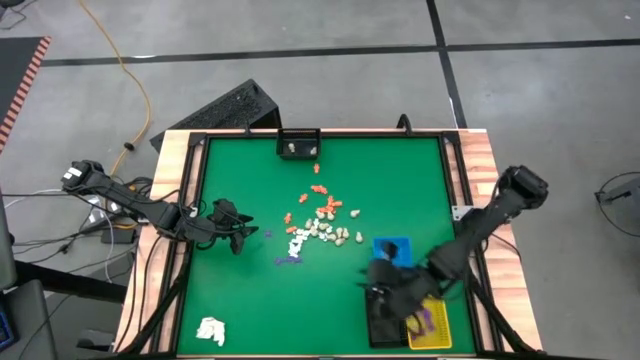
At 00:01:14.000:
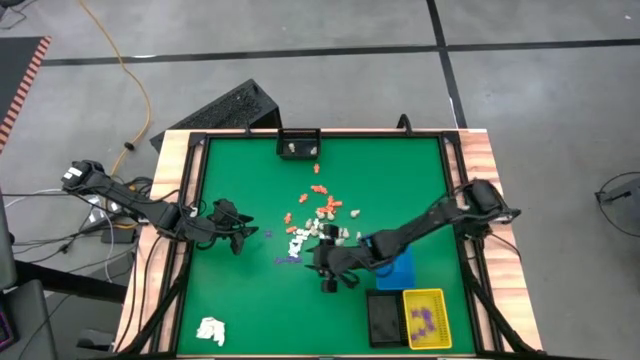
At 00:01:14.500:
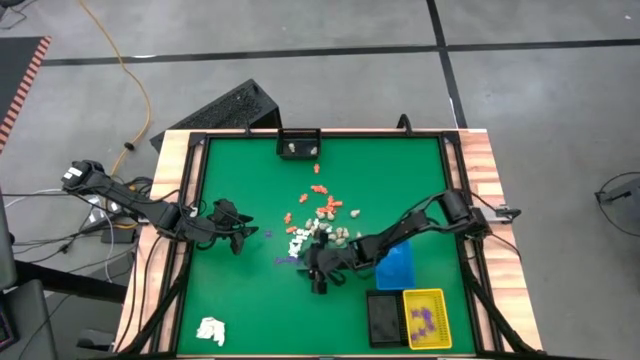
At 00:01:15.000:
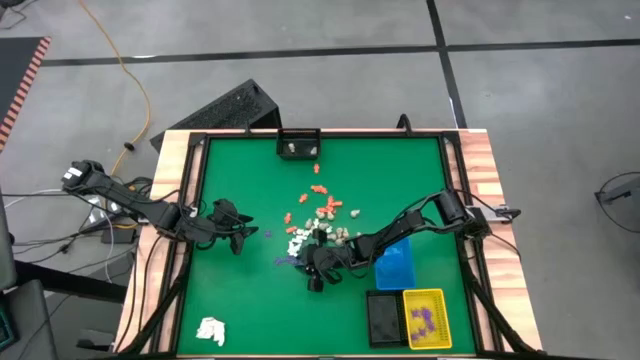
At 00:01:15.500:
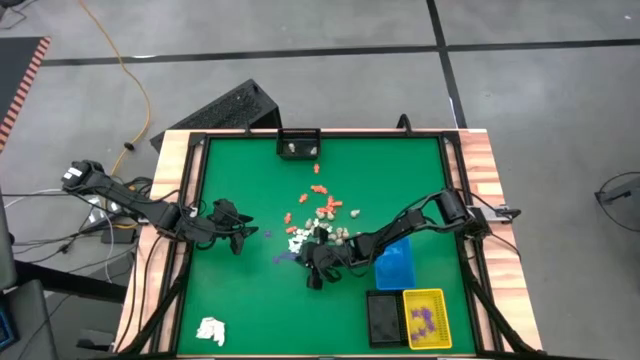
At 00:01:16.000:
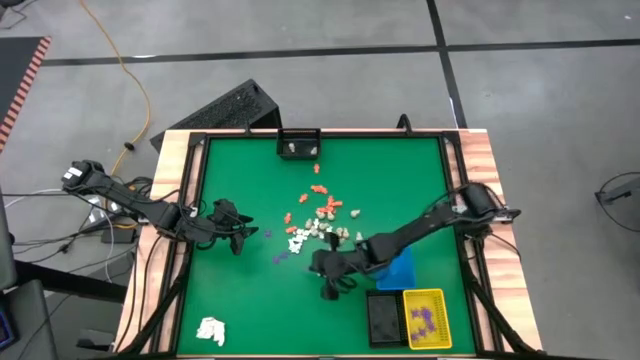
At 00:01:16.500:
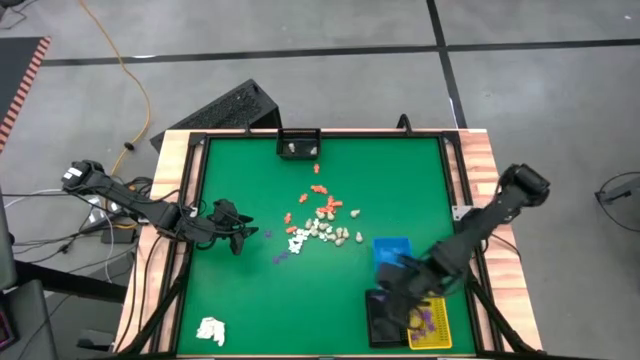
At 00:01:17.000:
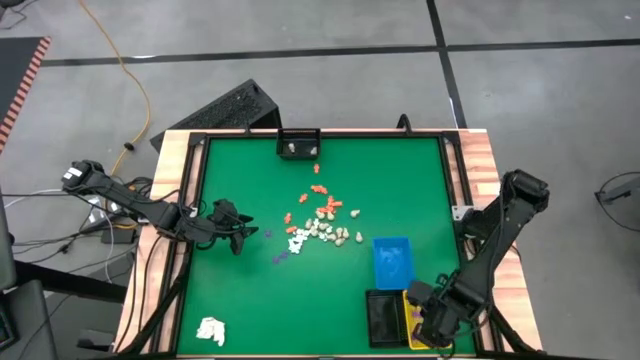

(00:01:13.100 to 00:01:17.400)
Task: Sort Halloween decoration
Put the purple spider toy into the yellow bin

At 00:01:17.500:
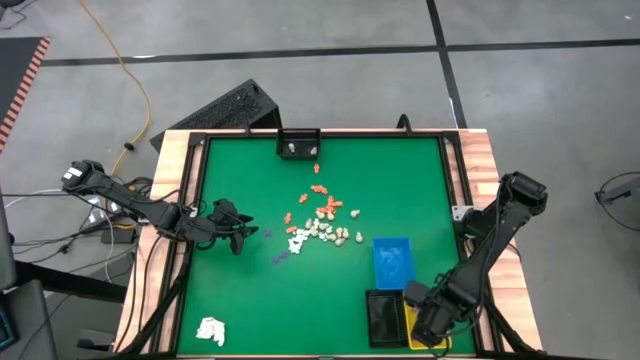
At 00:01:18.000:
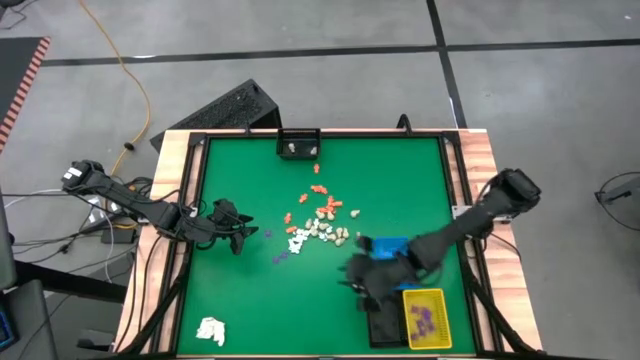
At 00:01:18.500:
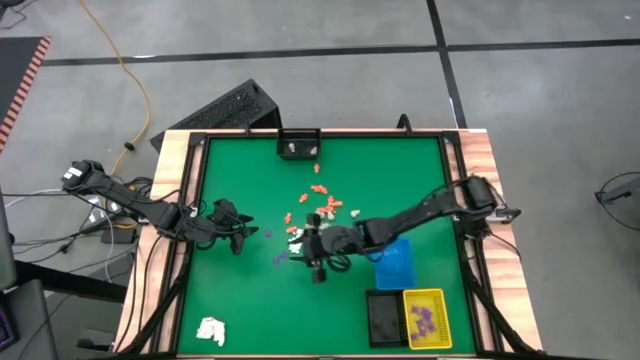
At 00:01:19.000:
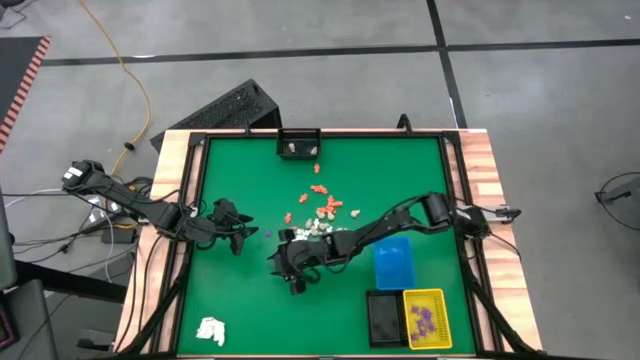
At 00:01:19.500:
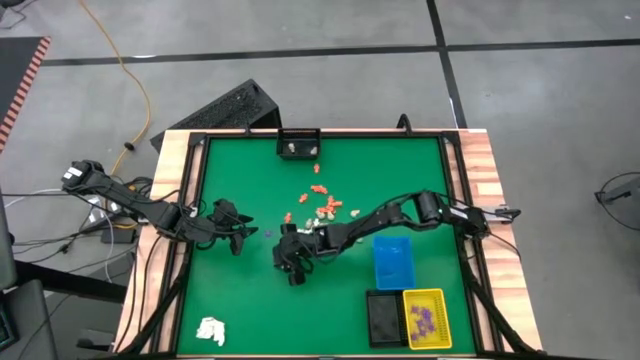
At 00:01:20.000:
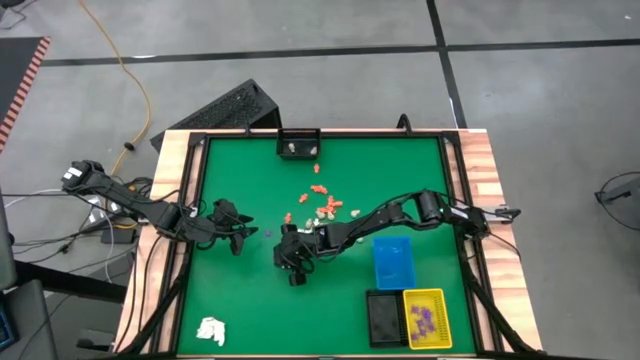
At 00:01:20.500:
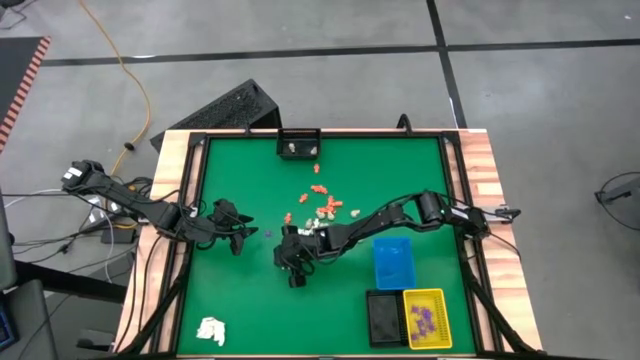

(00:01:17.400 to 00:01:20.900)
Put the purple spider toy into the yellow bin

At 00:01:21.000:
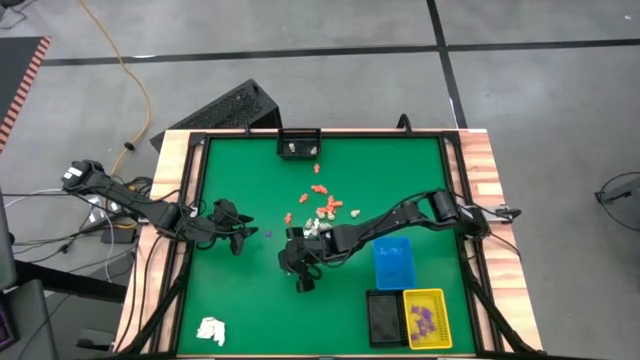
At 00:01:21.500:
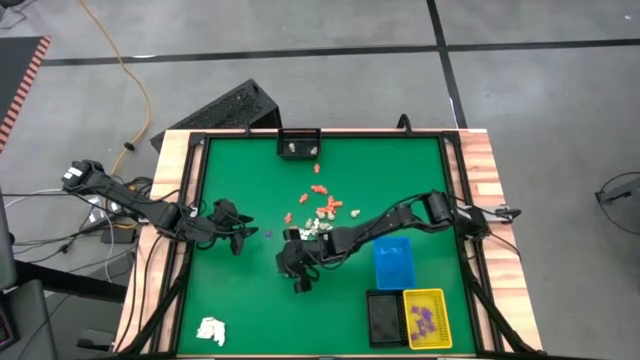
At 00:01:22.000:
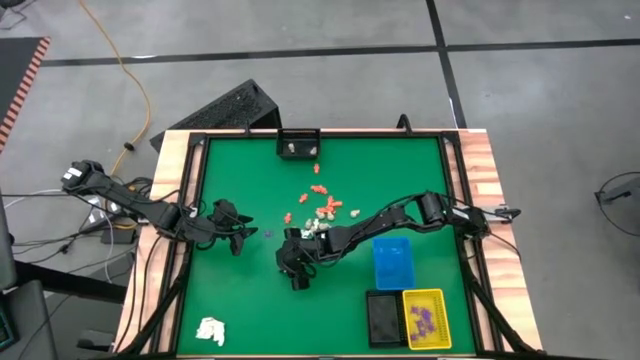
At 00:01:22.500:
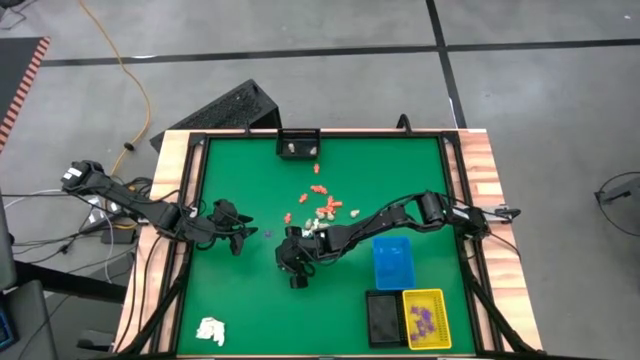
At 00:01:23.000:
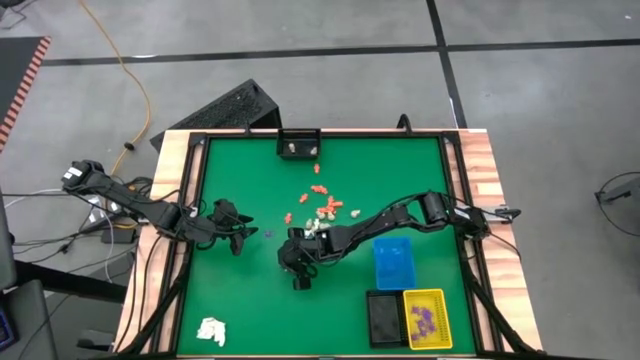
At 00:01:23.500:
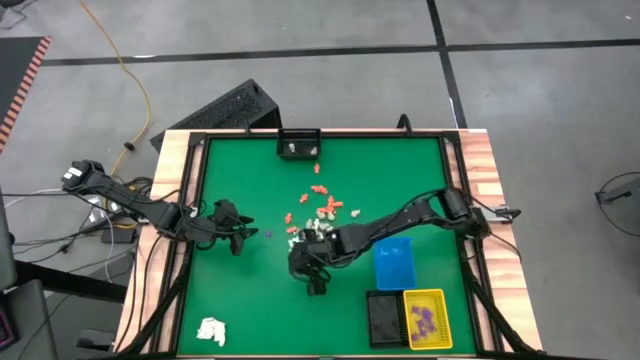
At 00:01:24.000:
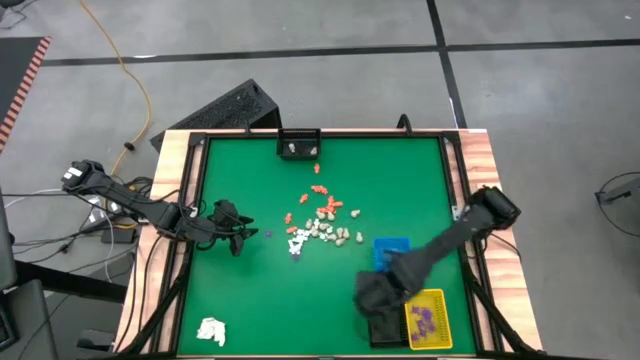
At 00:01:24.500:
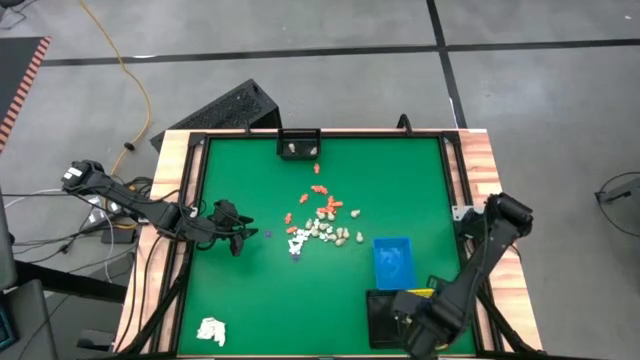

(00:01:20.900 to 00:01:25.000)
Put the purple spider toy into the yellow bin

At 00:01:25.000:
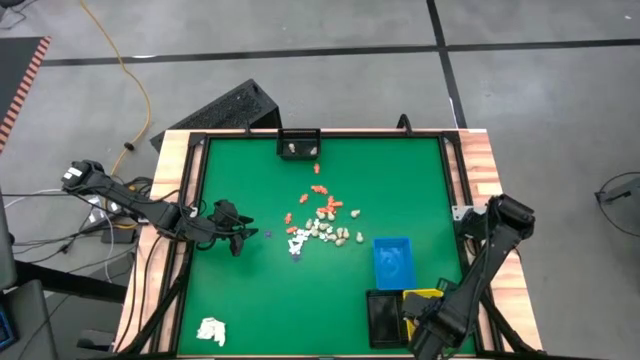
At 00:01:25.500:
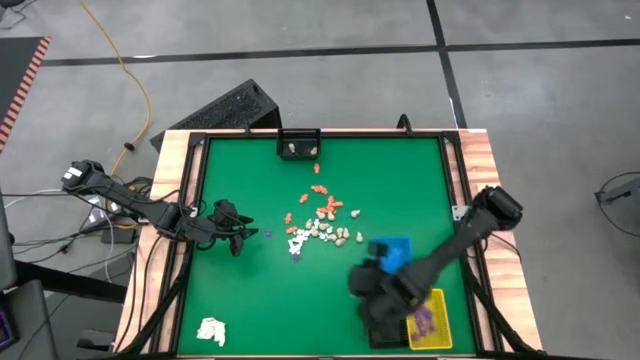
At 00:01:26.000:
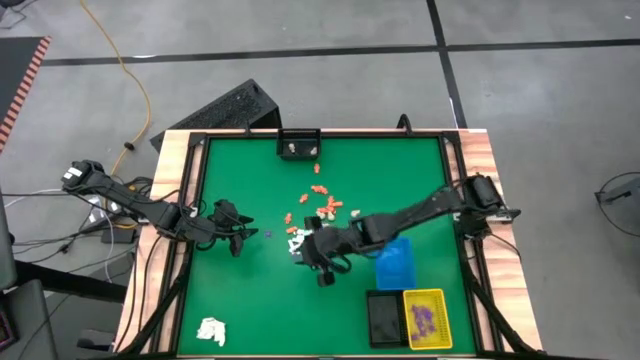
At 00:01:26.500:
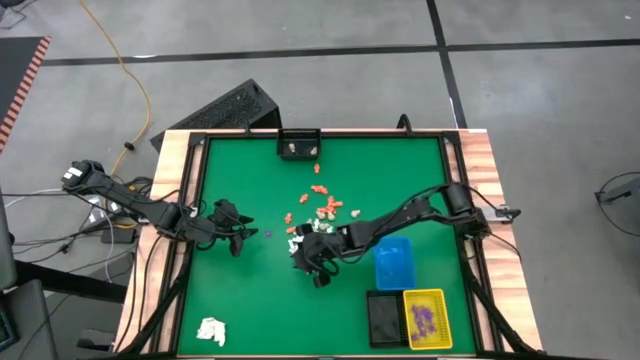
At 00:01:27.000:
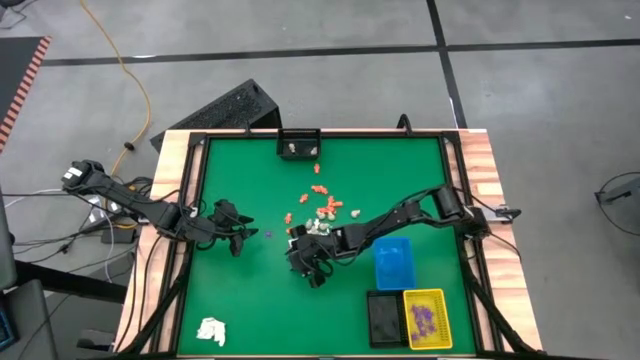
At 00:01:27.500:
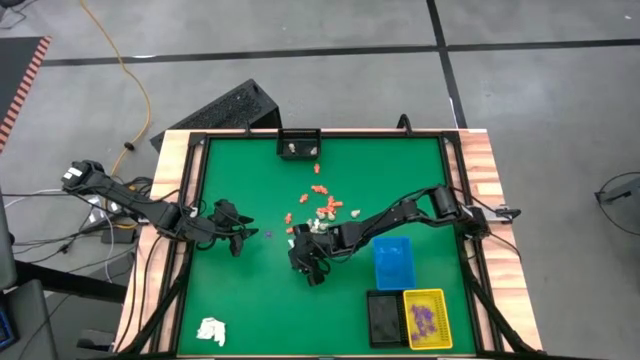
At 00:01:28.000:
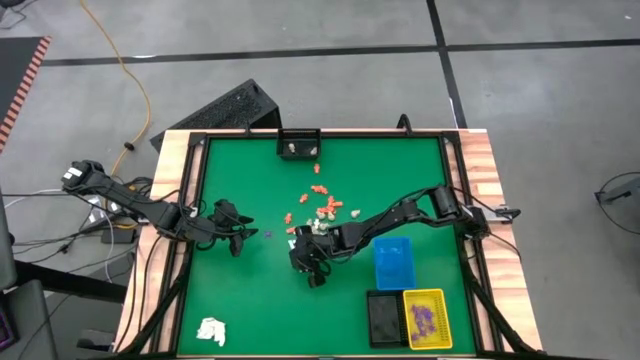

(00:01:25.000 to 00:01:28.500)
Put the purple spider toy into the yellow bin

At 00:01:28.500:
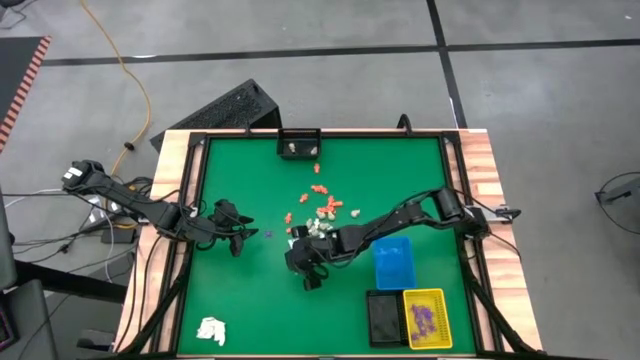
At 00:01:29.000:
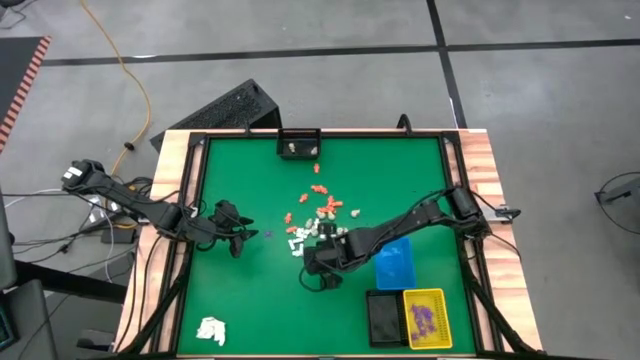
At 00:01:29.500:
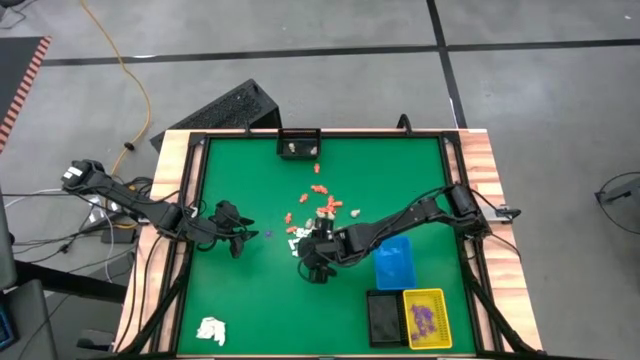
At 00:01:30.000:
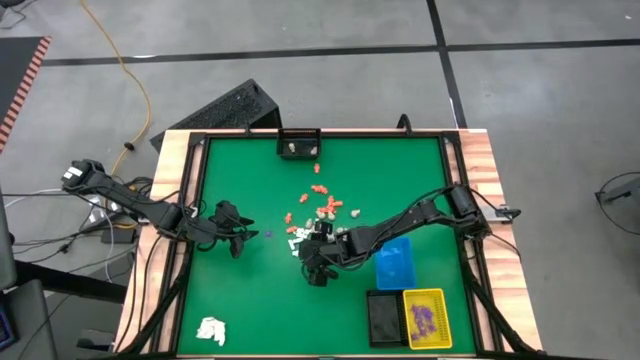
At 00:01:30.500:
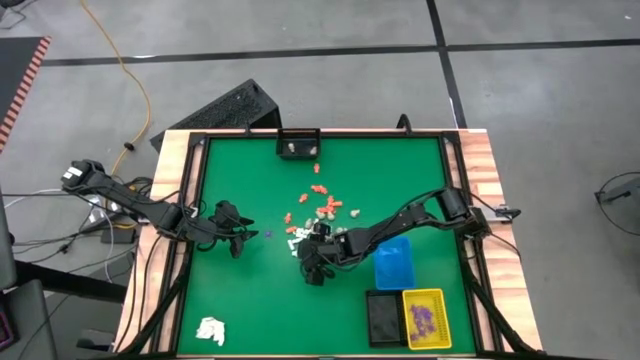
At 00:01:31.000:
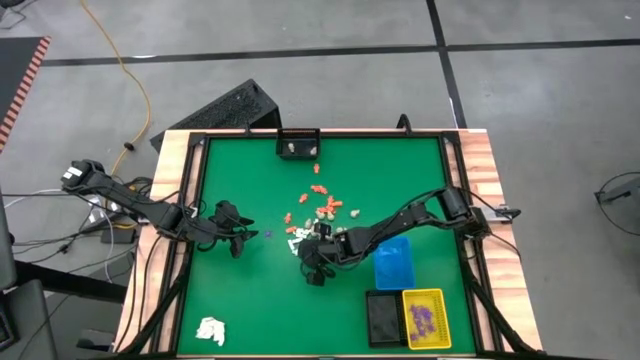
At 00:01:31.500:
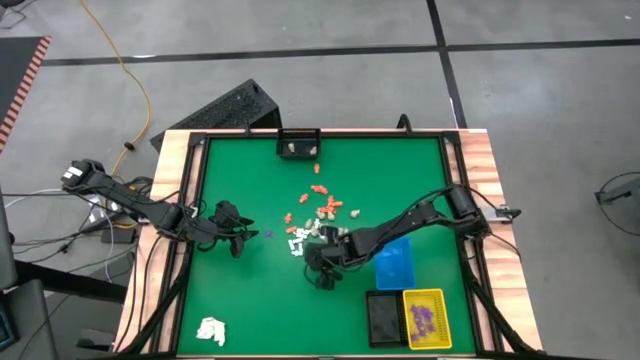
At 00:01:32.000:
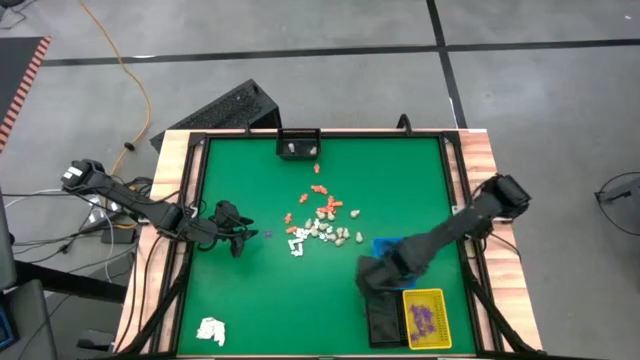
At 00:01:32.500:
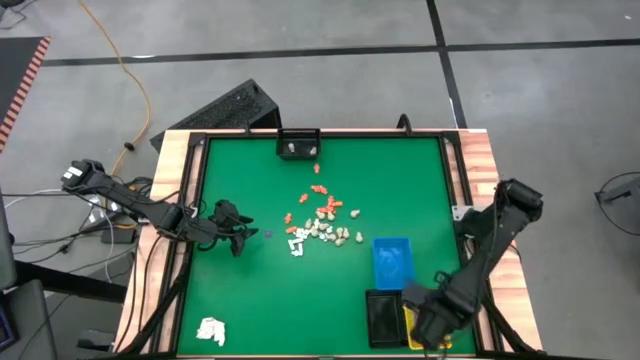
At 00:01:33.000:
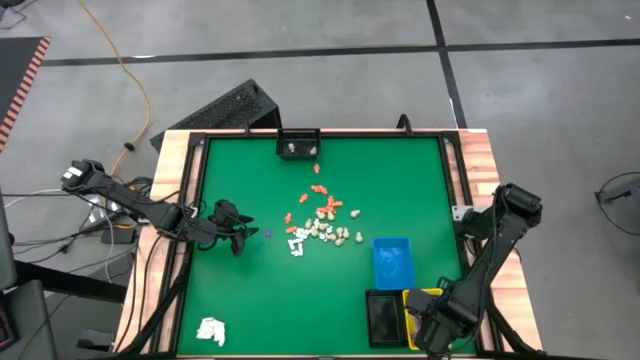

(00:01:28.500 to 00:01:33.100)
Put the purple spider toy into the yellow bin

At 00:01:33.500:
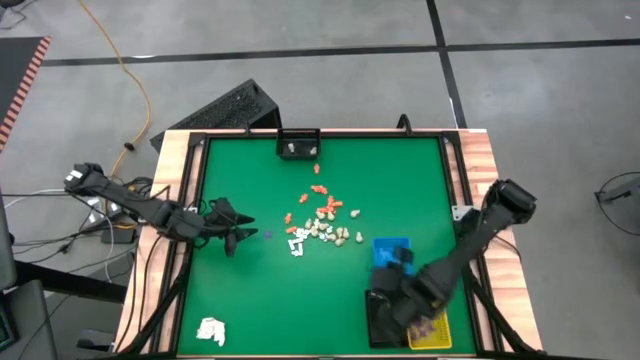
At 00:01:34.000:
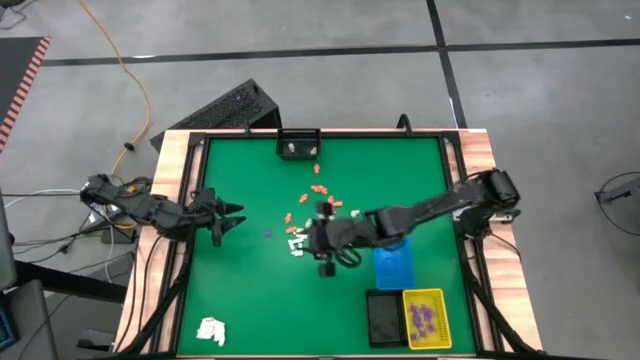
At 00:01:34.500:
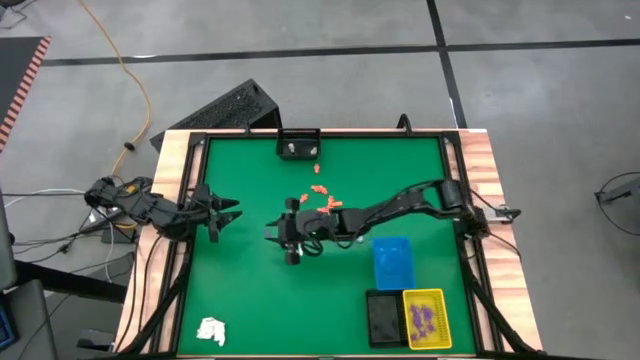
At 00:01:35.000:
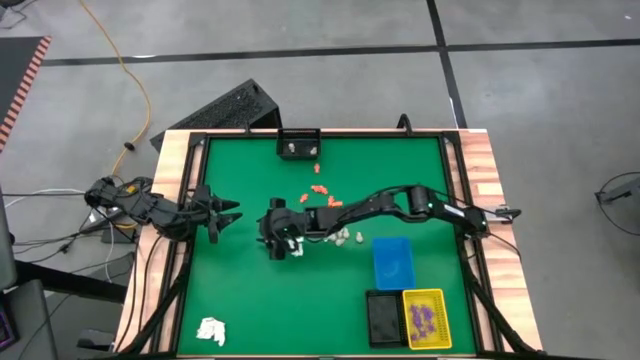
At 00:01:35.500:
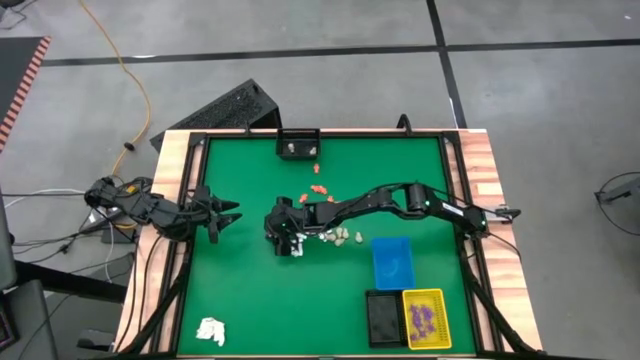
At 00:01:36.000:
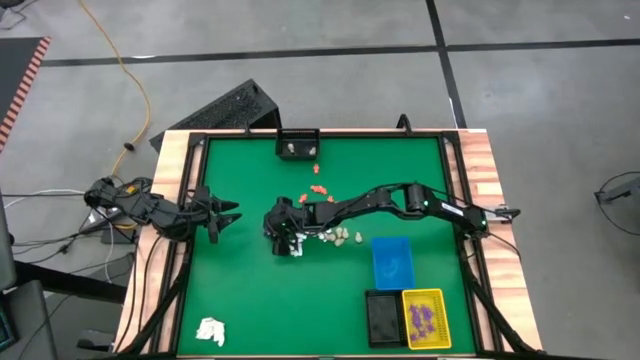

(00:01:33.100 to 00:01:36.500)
Put the purple spider toy into the yellow bin
